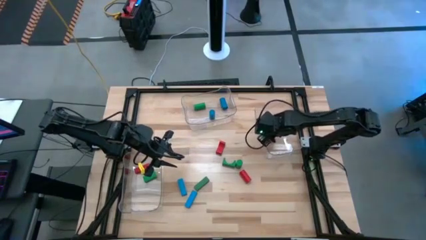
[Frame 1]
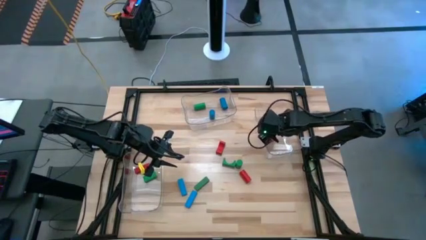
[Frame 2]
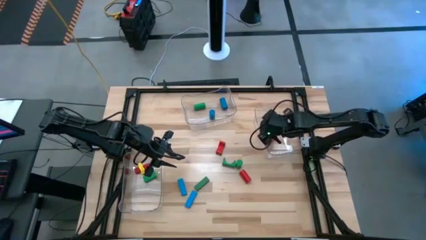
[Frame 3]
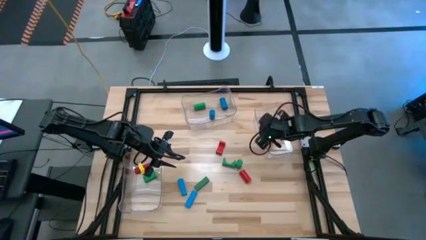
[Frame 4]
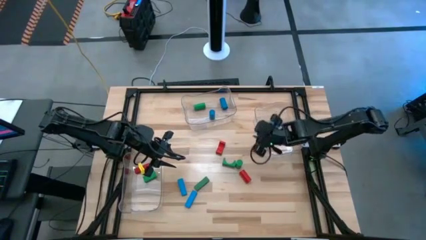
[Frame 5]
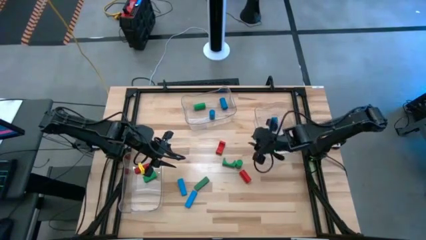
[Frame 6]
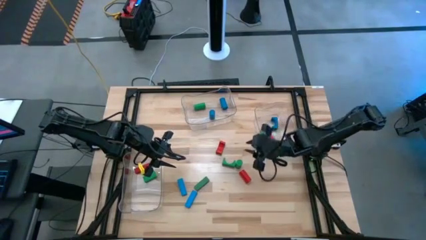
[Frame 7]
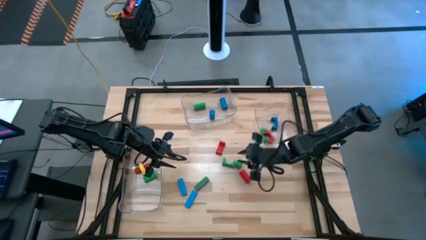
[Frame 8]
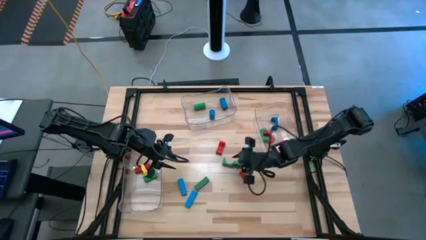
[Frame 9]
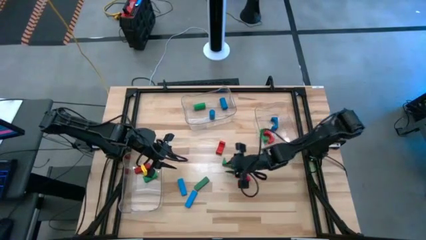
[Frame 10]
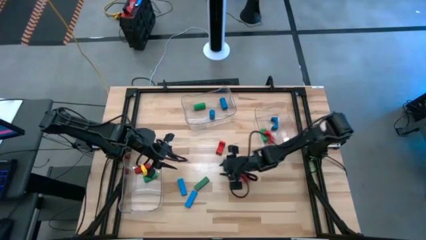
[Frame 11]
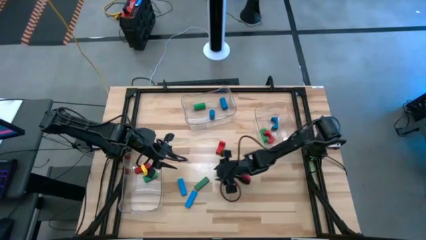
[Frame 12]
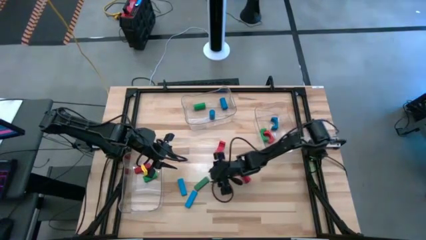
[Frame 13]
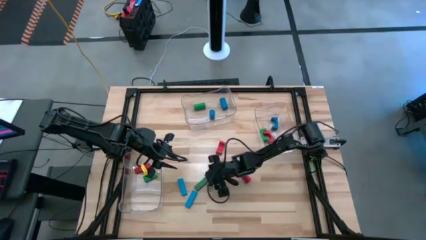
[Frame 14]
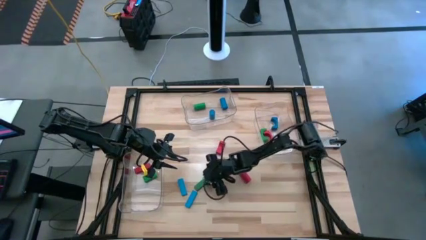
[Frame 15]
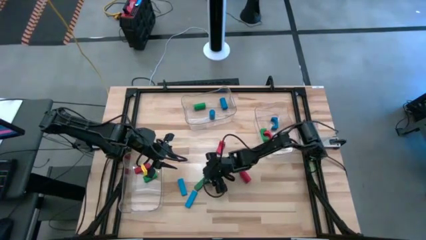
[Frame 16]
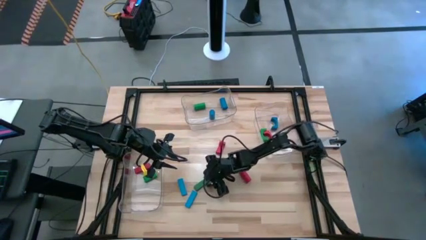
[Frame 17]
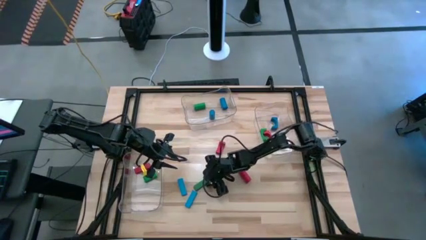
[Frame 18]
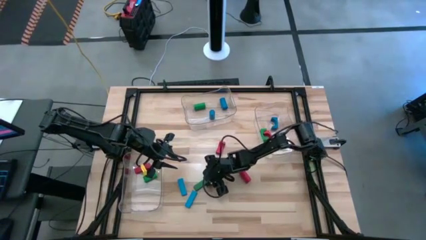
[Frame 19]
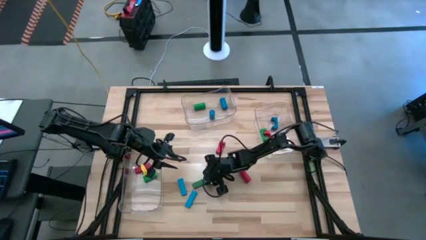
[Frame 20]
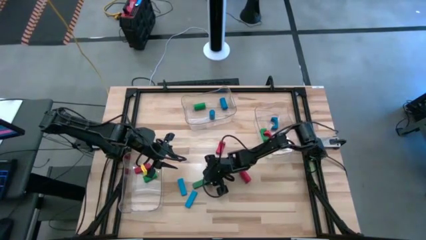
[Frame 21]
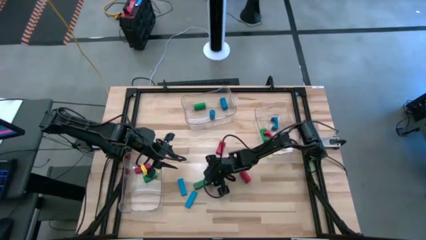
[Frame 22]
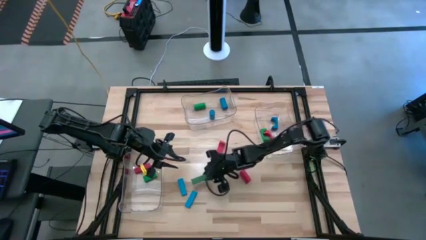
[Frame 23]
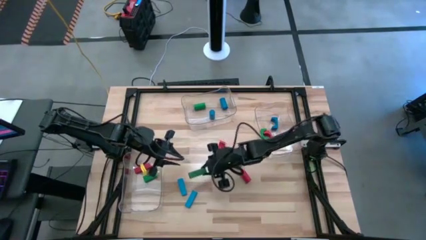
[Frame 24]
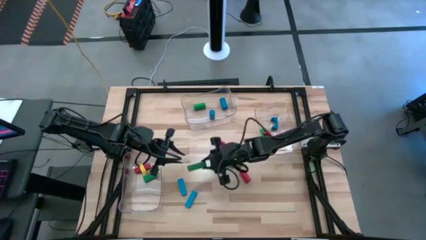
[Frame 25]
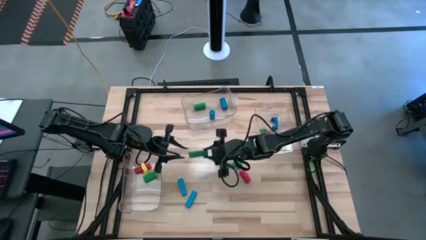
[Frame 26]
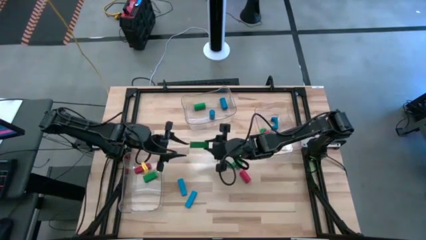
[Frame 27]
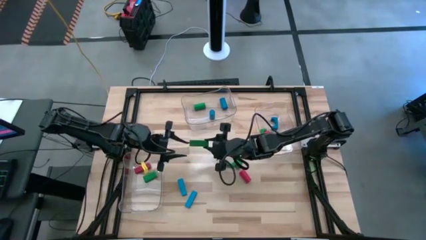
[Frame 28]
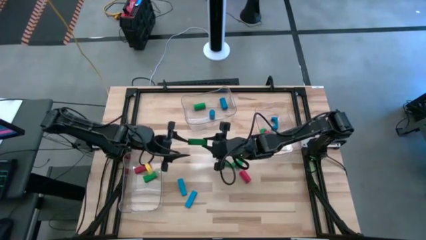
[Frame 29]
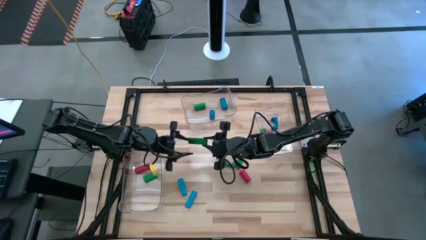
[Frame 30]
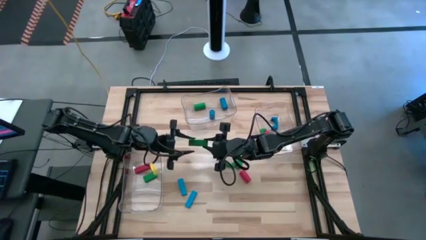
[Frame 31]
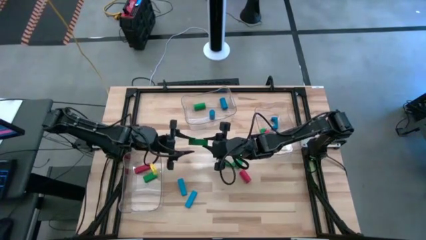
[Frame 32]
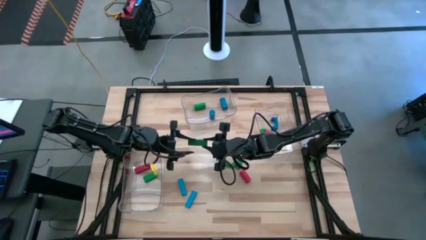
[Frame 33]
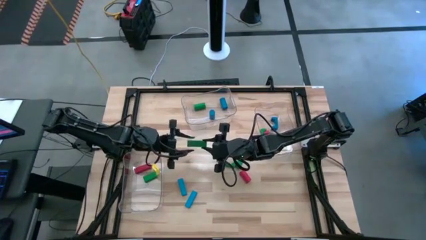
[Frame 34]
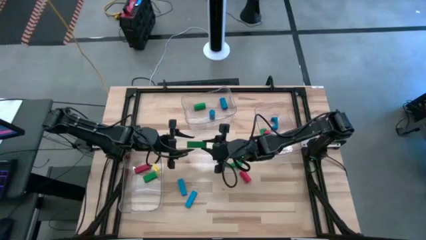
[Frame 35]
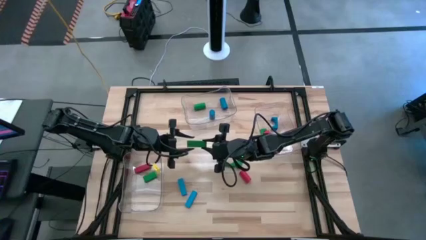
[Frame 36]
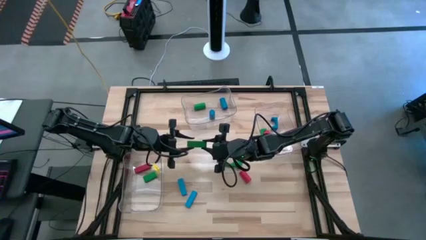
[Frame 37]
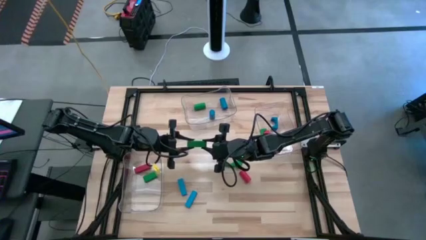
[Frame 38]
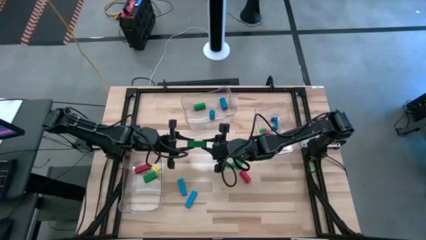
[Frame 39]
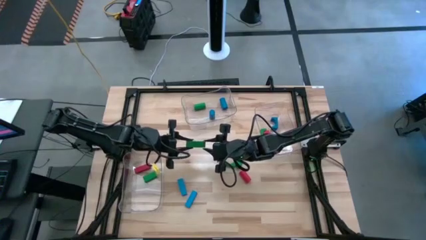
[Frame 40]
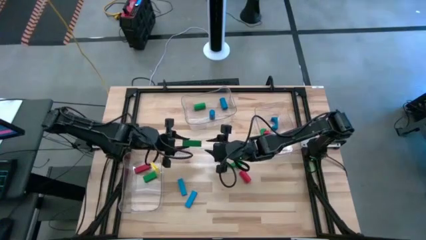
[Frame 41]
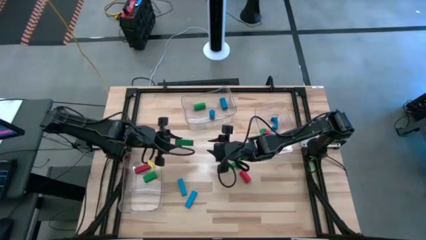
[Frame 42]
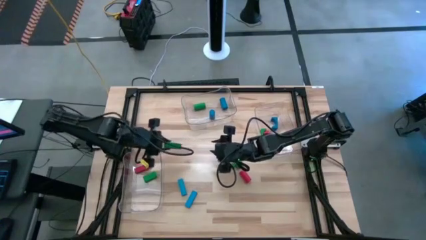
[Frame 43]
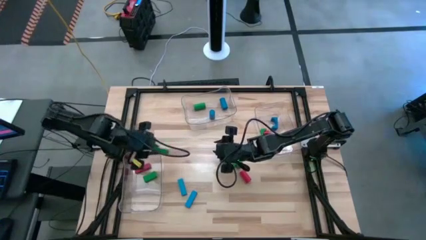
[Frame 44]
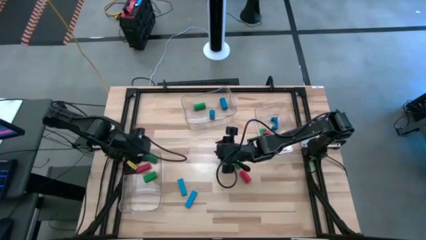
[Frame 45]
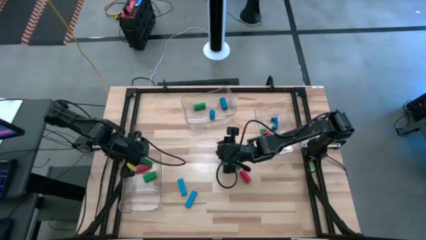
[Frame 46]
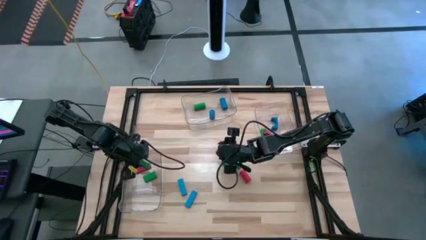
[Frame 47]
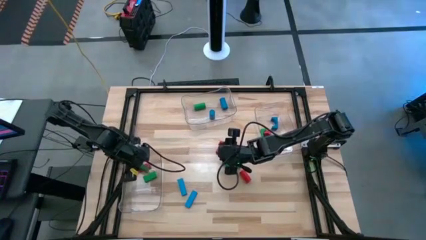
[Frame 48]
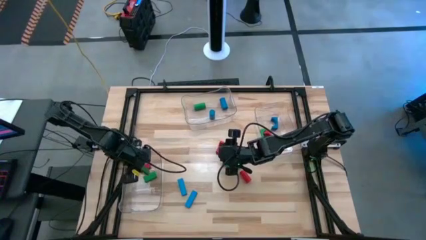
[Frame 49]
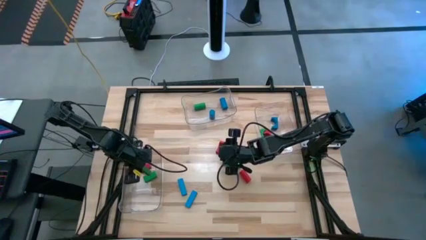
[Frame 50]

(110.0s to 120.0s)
Task: Sort blocks by size
Put the green rectangle block into the left transparent bin

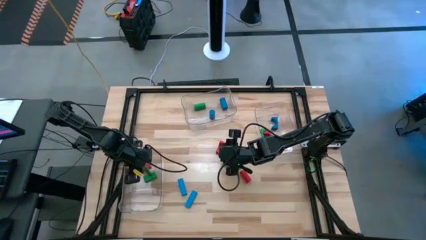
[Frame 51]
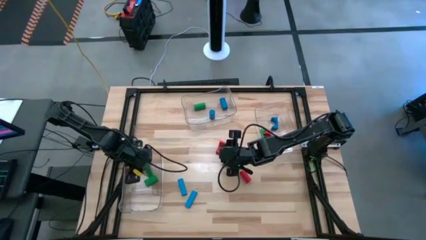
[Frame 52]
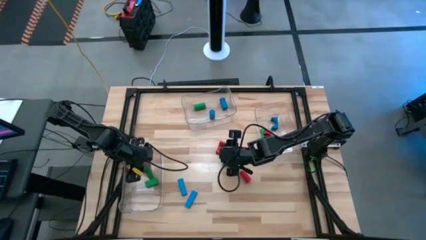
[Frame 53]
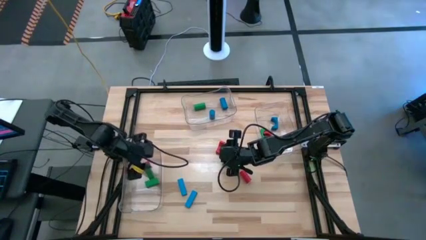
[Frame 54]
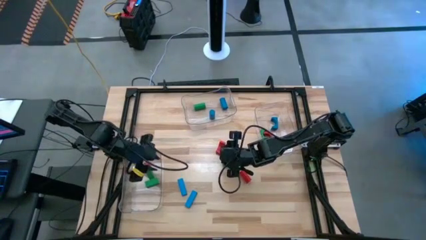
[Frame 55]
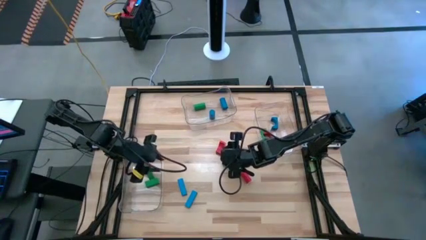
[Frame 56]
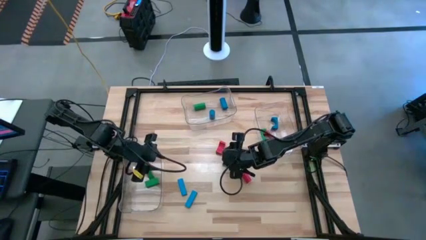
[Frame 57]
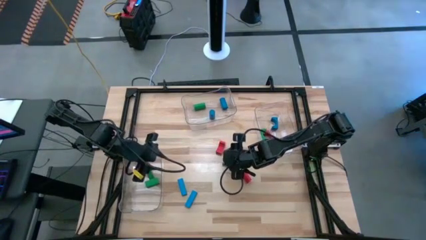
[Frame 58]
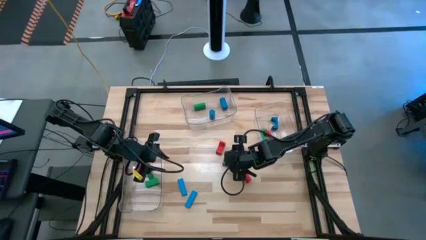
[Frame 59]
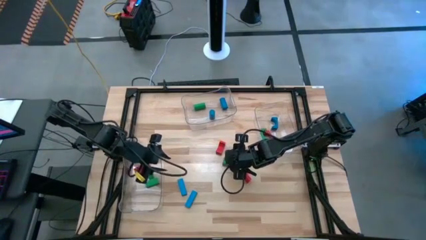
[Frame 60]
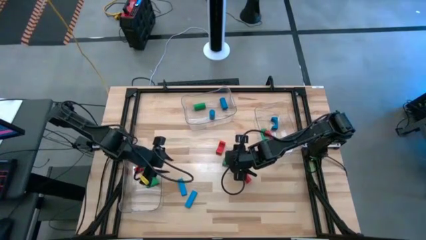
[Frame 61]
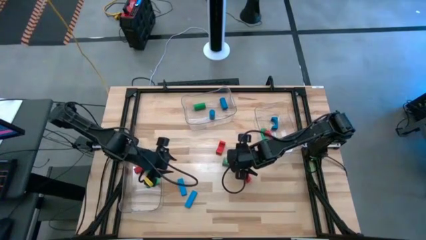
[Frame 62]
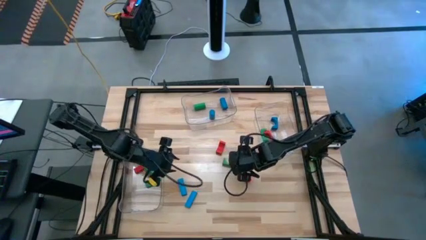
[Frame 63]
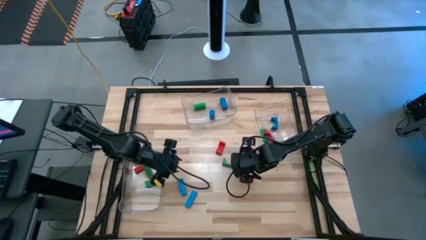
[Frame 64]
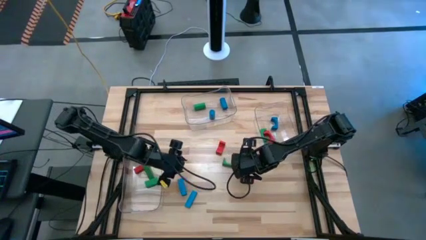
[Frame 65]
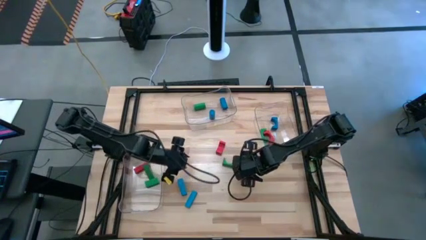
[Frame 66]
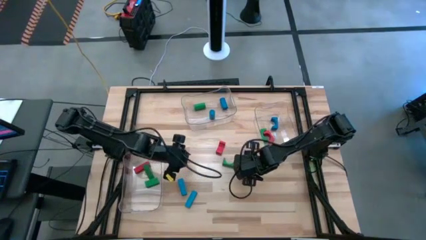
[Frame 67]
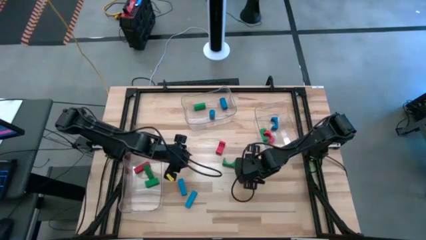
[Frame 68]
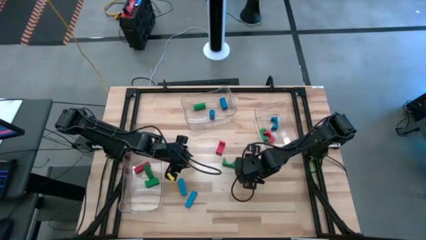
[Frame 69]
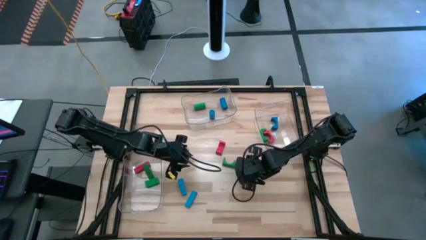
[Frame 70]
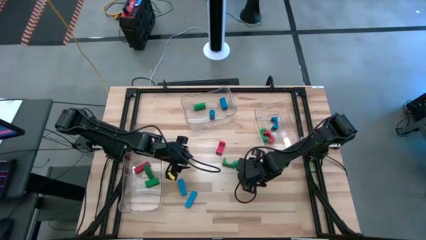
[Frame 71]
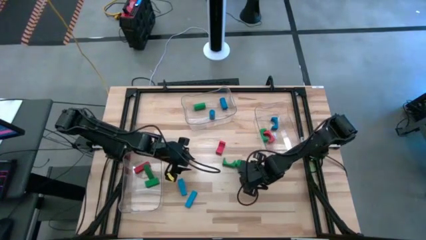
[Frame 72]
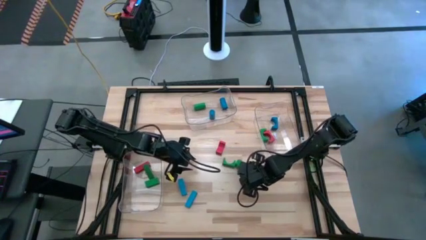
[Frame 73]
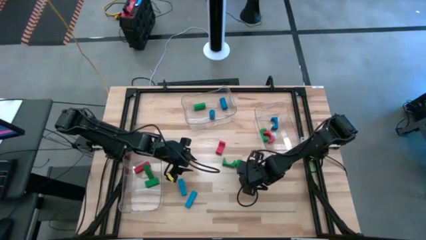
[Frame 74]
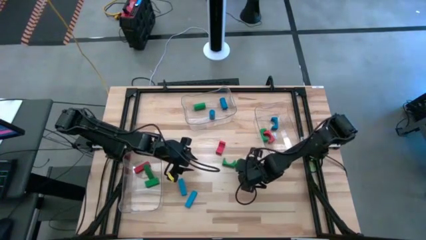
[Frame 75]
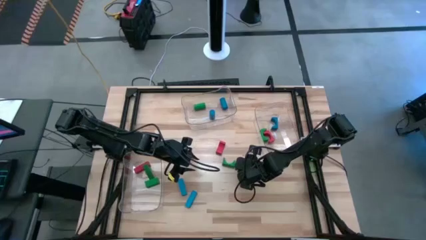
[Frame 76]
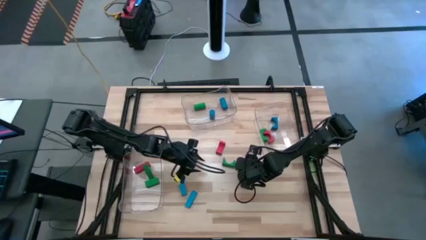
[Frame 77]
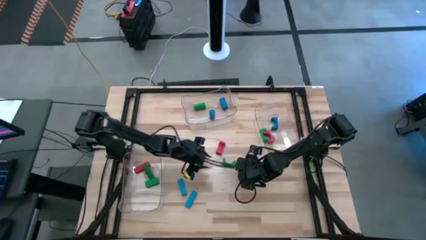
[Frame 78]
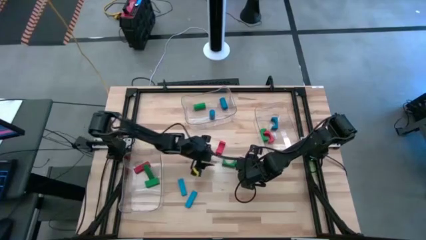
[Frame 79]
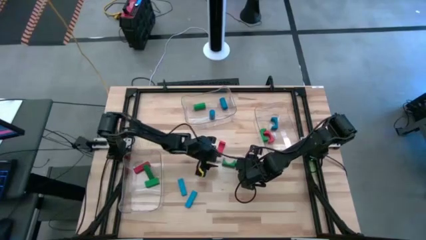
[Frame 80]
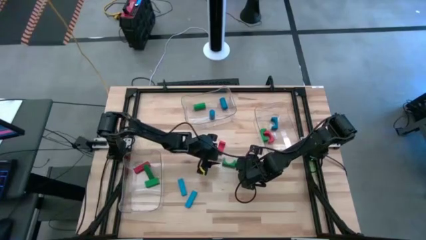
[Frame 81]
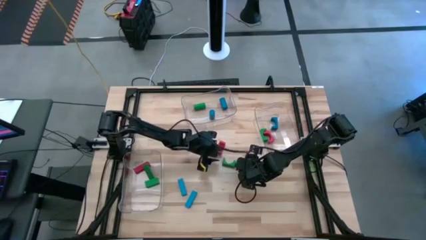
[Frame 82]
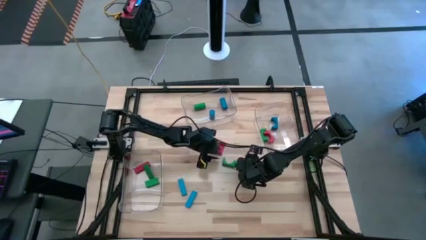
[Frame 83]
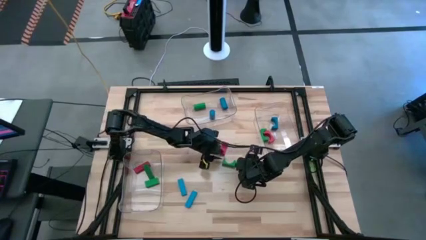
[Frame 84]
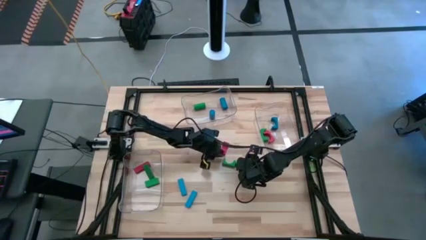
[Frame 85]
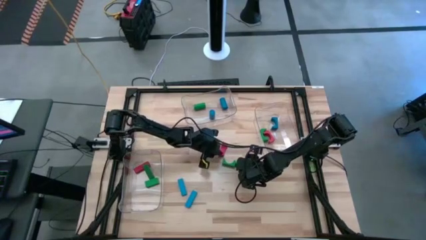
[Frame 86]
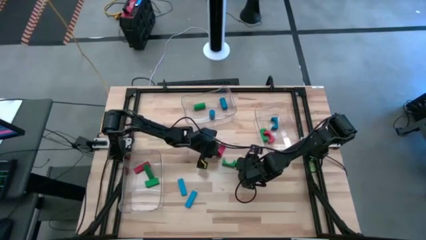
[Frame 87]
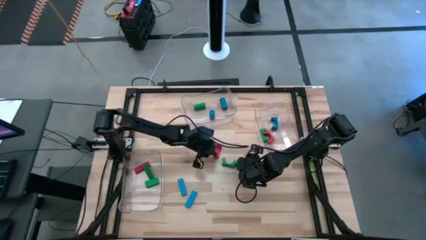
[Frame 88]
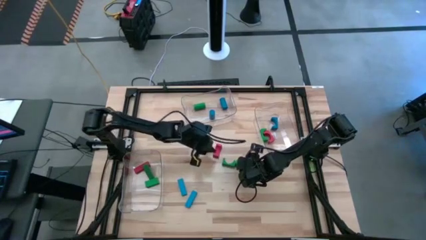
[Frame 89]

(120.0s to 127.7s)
Put the red arch block into the right transparent bin
